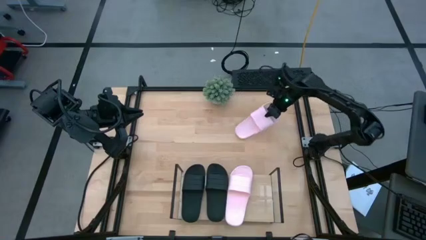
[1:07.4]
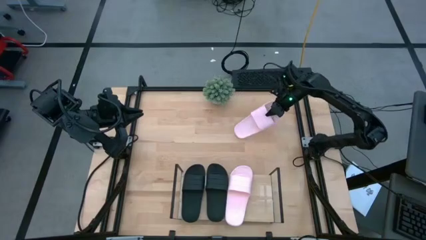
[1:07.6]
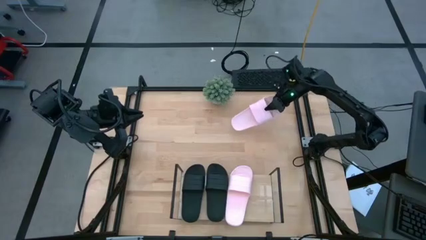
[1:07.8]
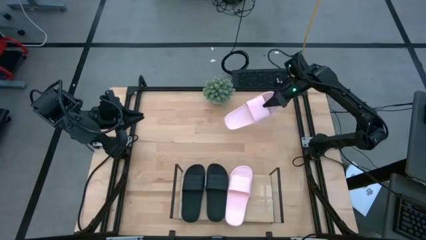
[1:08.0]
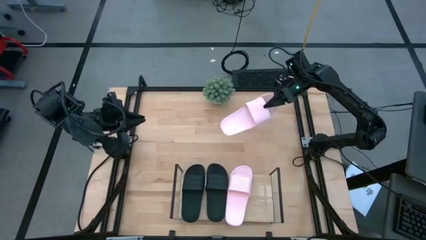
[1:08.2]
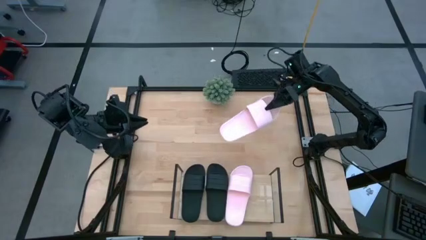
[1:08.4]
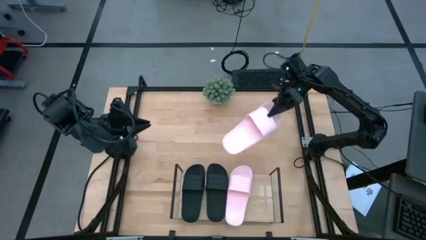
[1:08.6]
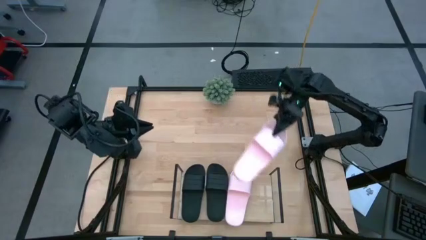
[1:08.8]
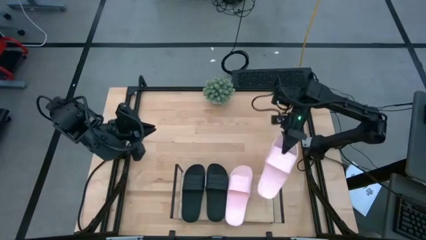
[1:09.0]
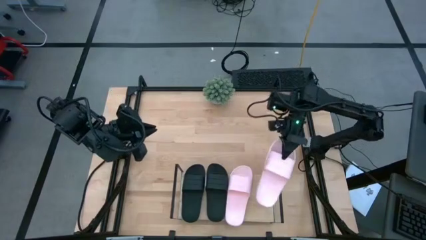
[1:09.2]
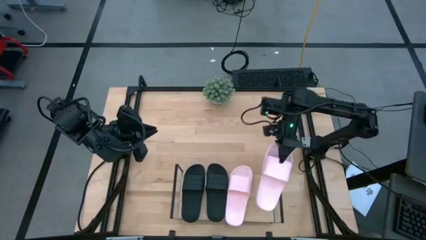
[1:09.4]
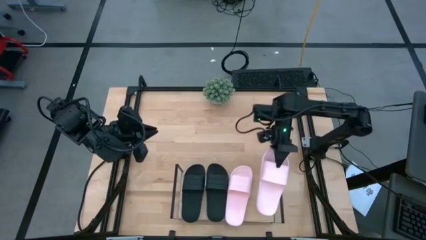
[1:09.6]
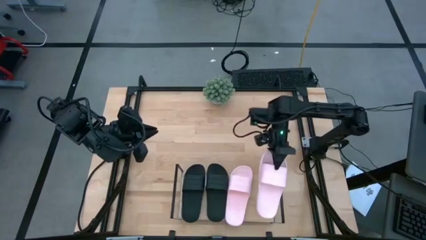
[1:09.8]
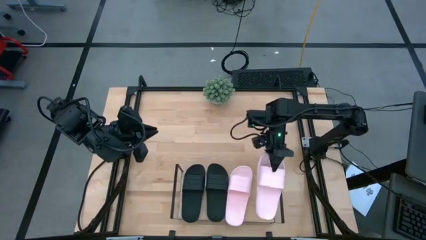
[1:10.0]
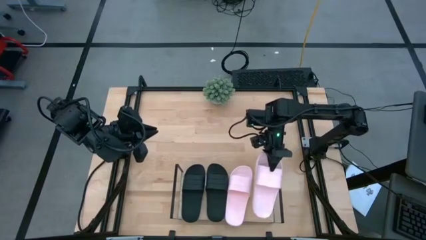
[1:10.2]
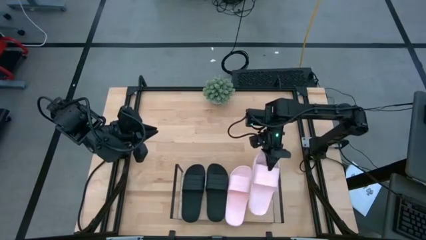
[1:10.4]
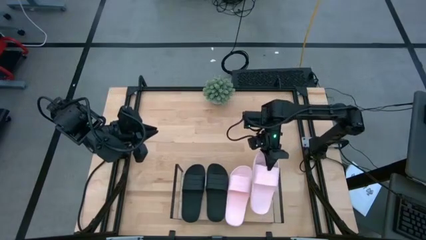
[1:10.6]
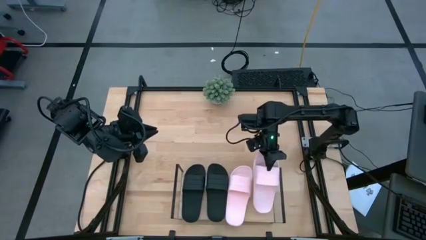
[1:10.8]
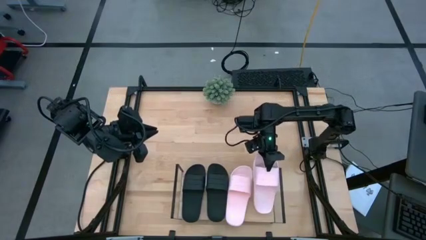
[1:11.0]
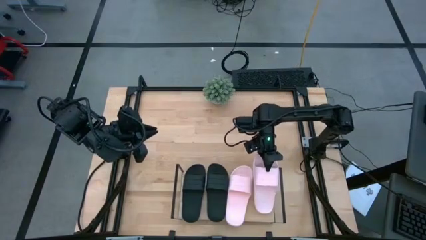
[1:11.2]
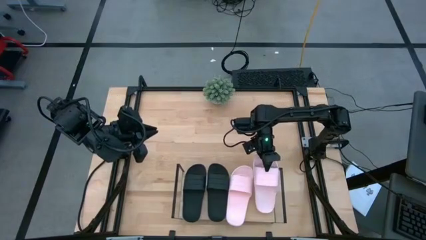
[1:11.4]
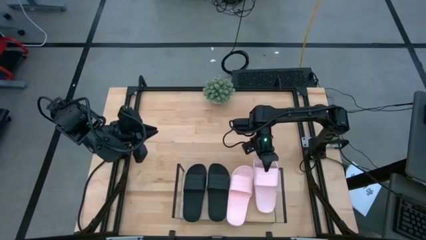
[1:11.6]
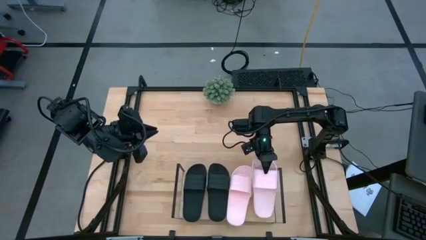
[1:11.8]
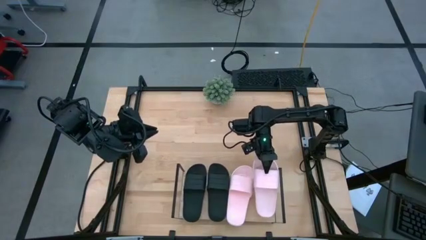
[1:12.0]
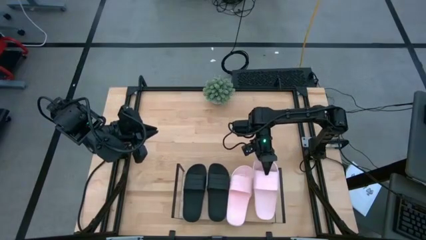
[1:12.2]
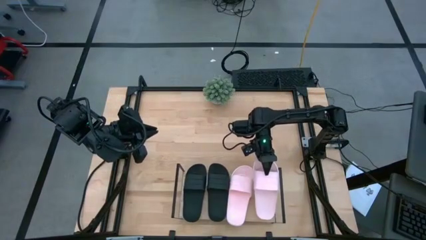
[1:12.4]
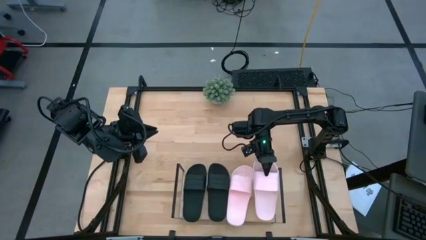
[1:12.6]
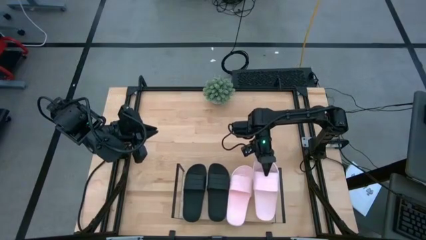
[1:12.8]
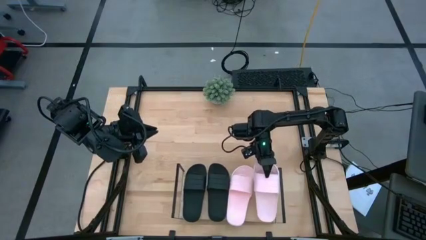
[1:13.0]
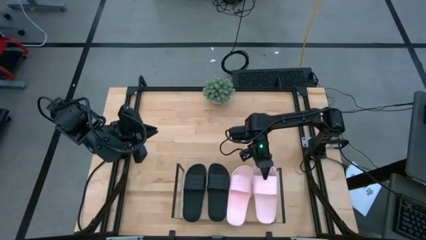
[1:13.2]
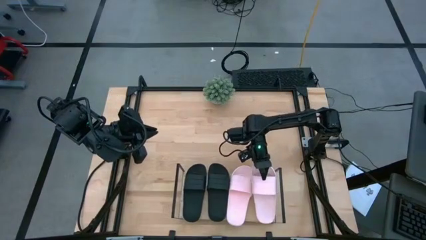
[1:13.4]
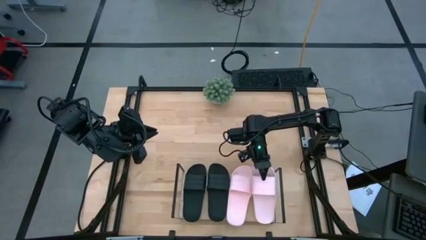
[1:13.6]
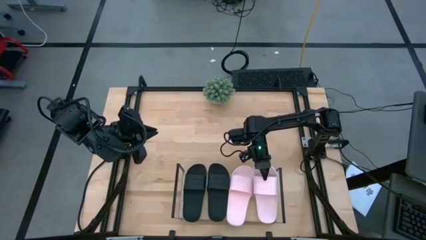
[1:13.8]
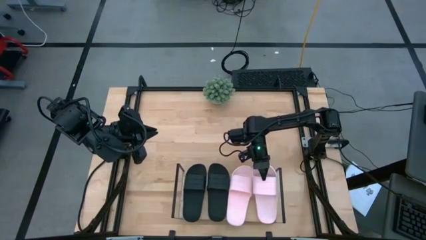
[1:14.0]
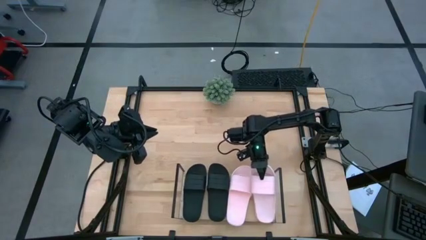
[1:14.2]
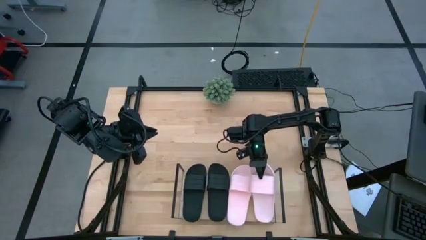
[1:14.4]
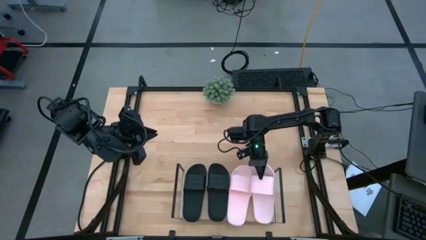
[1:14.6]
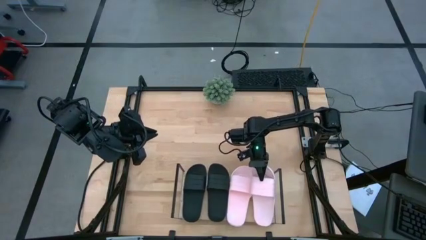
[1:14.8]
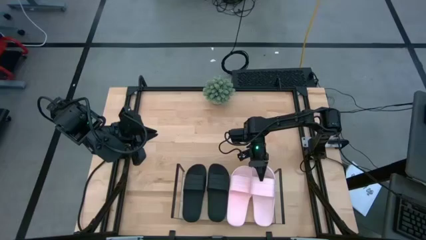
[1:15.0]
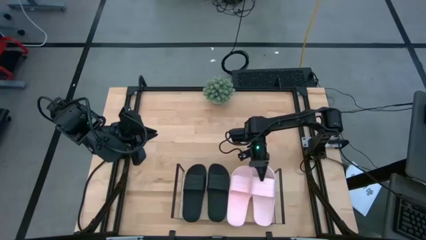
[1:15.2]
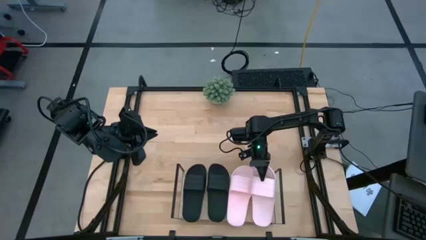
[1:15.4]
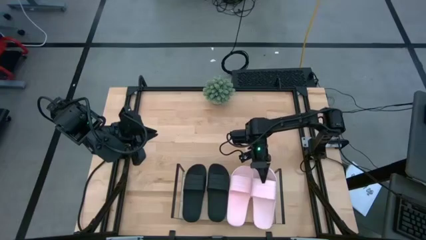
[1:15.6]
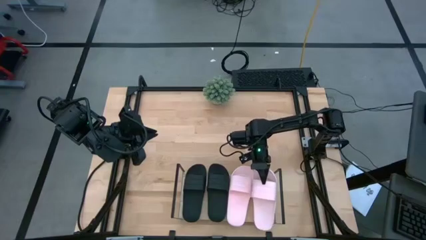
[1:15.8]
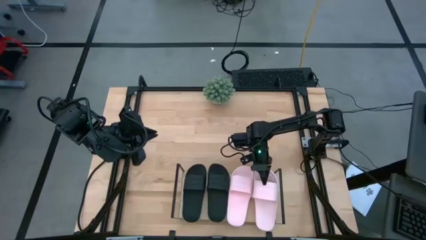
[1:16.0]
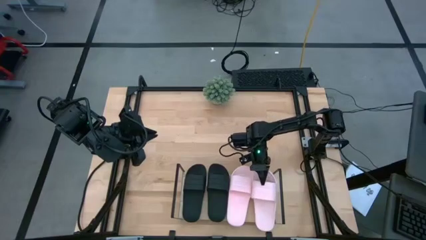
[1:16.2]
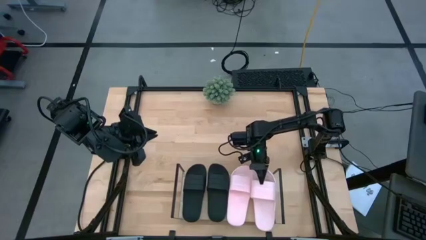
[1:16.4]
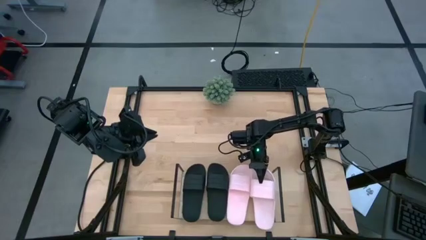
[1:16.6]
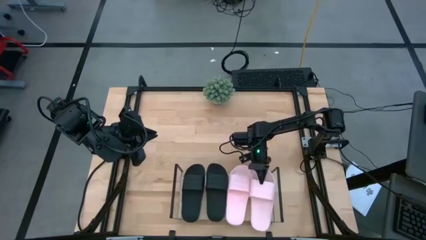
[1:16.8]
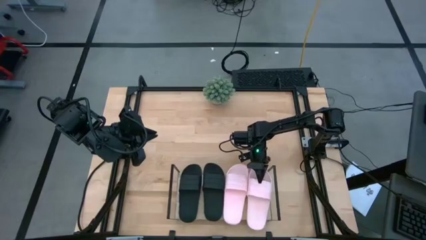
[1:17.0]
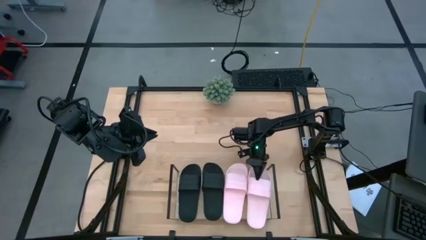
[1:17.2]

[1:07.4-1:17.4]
Task: Pick and place slides into the shelf
Put the pink slide on the shelf

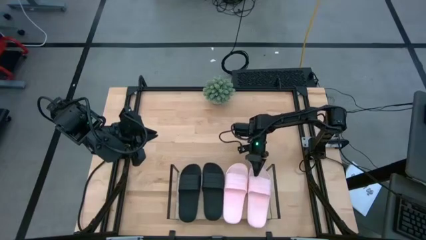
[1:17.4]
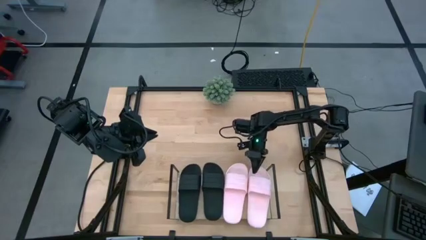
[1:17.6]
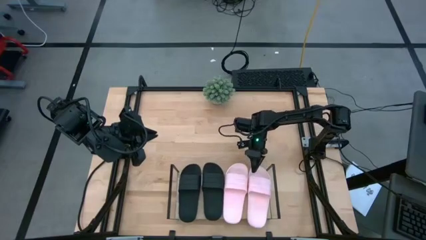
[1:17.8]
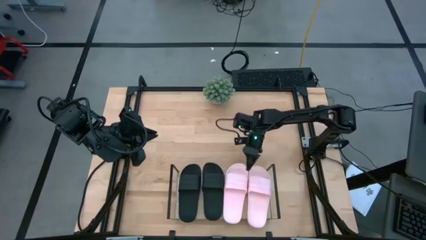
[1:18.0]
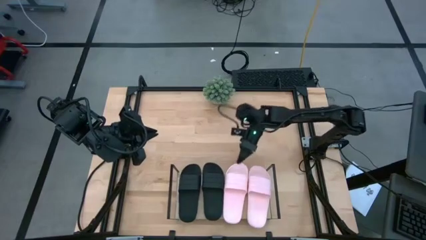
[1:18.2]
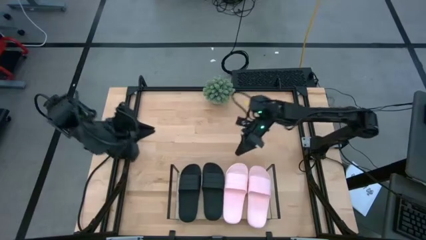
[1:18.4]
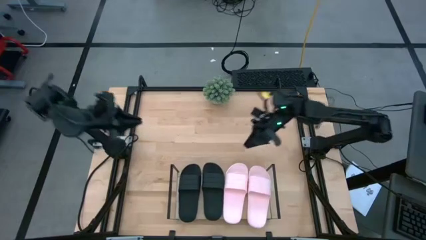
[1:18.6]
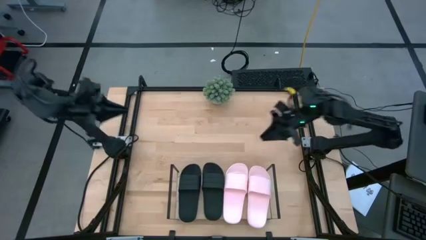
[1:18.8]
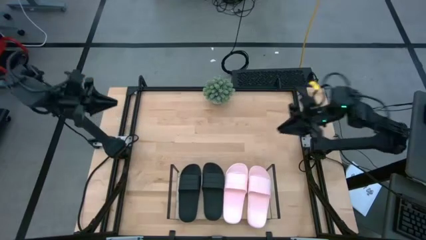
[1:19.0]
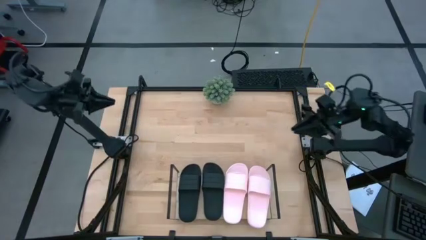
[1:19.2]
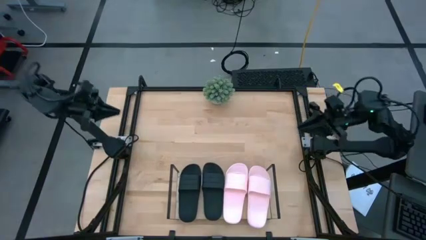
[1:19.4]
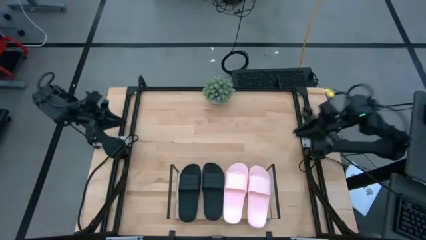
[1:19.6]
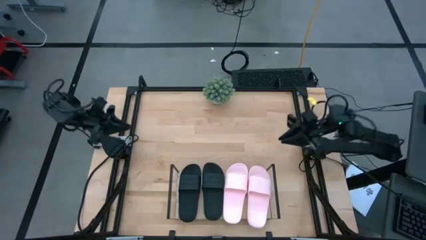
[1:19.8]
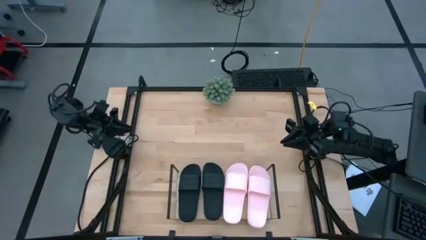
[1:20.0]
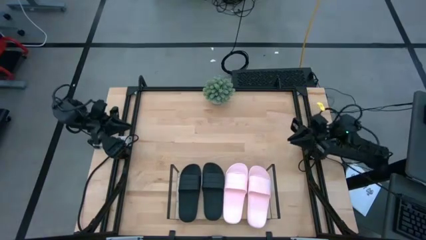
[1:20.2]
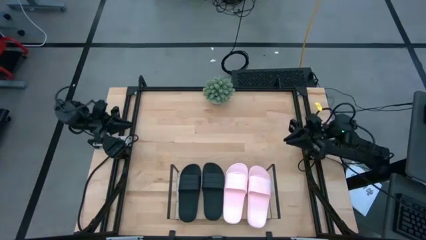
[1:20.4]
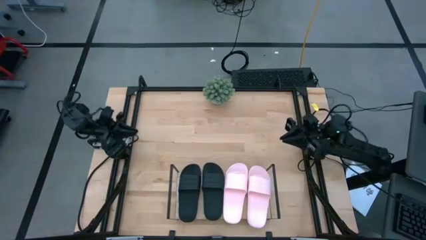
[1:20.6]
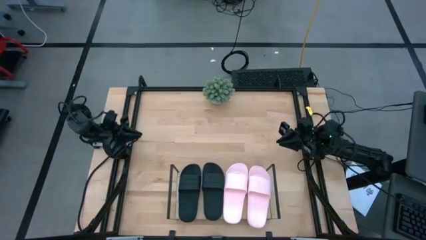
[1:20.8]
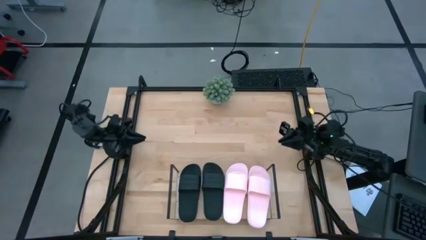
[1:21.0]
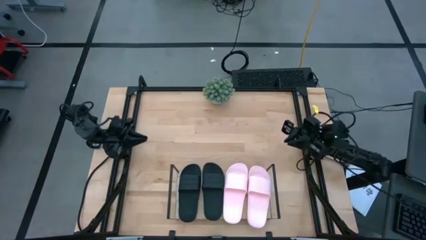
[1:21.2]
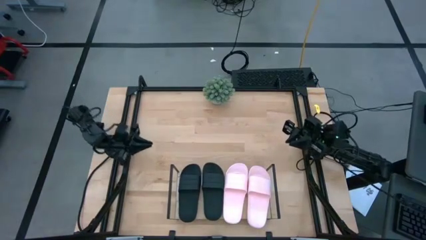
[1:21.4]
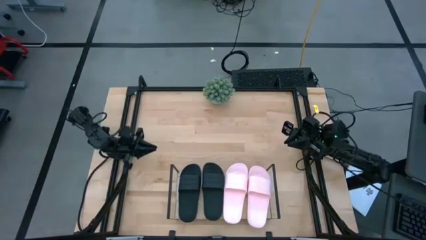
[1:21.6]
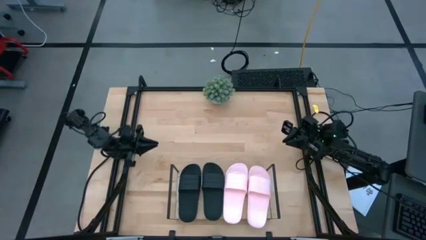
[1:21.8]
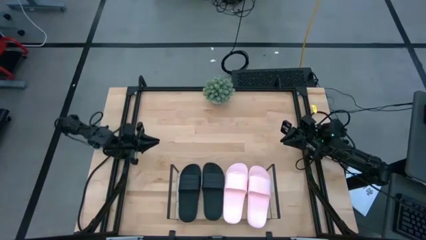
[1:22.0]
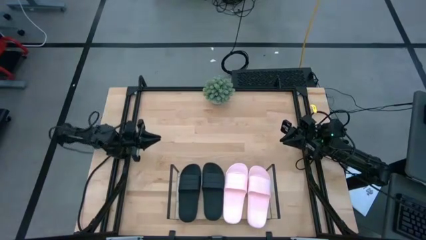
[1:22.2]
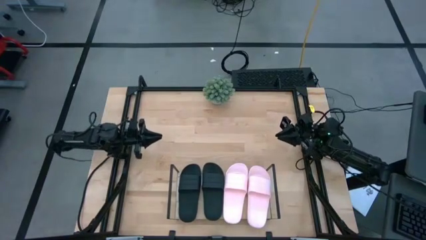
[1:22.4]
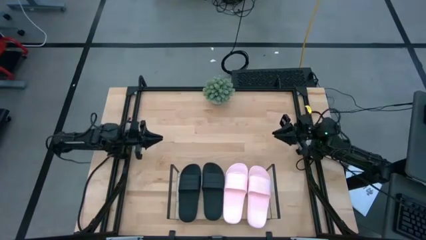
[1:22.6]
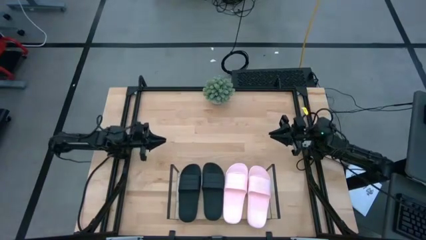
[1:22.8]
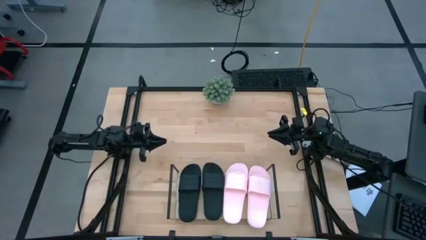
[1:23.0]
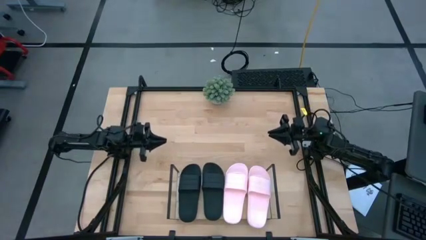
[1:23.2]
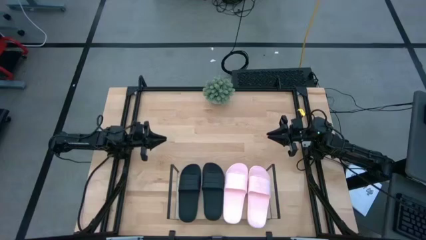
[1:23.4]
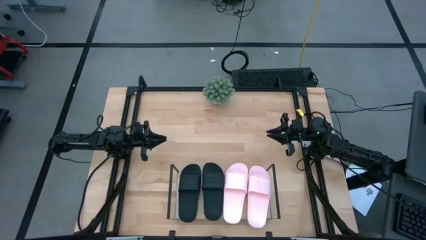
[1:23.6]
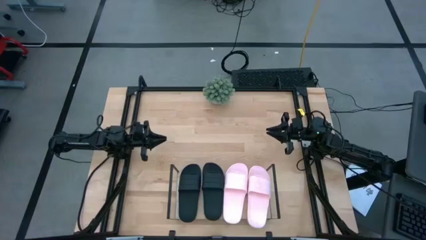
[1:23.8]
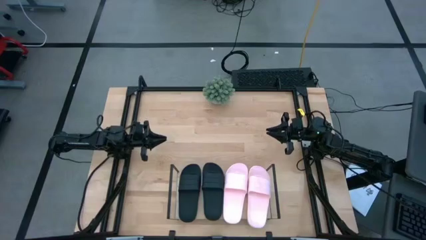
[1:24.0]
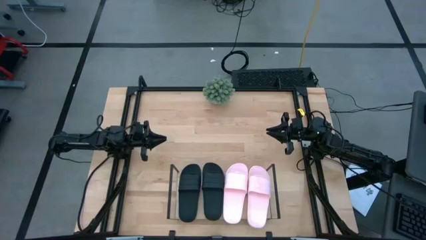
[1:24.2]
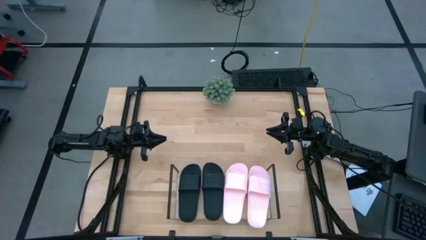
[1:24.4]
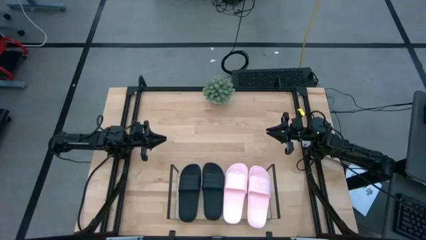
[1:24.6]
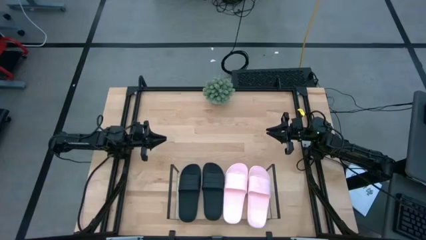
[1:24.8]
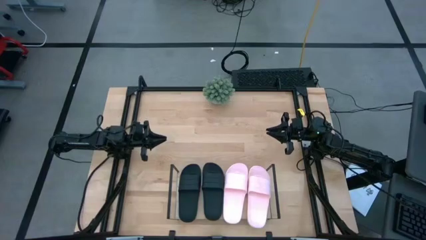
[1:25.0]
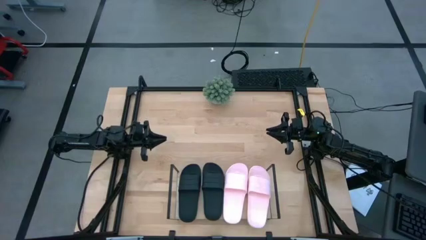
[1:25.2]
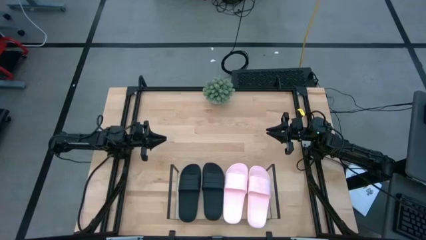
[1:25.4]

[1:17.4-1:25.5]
Return to Home Position
